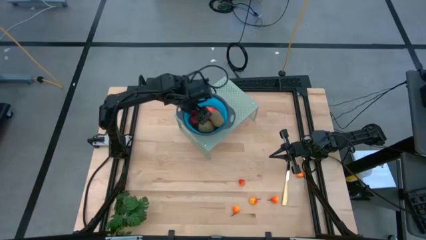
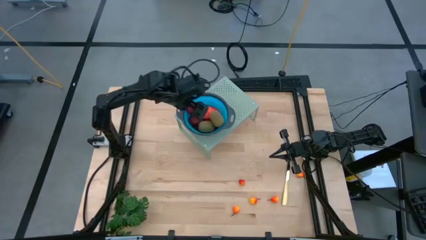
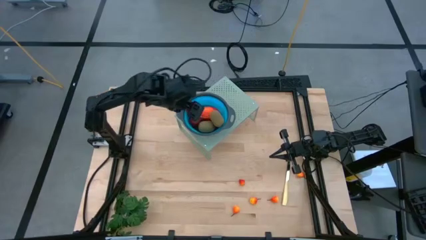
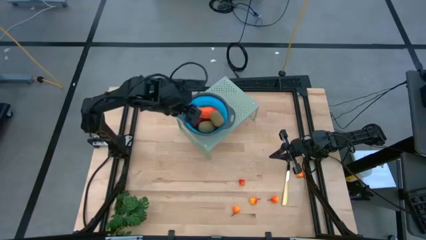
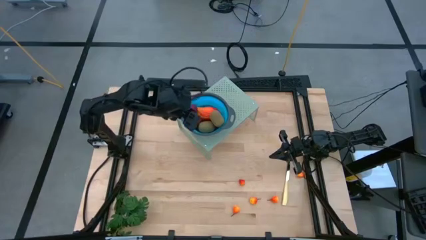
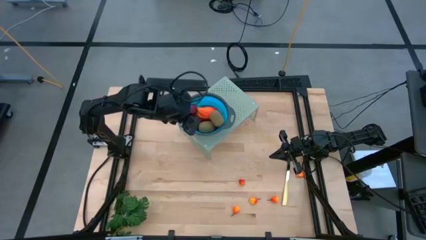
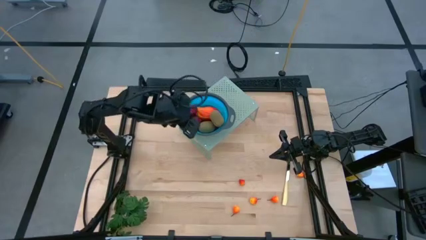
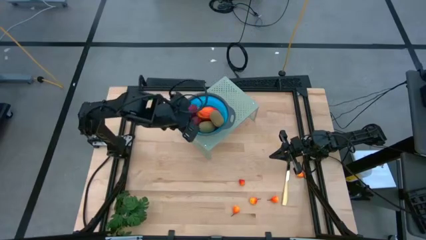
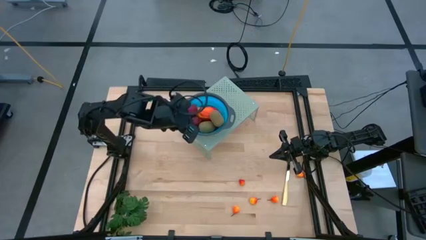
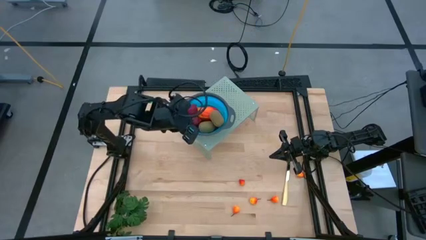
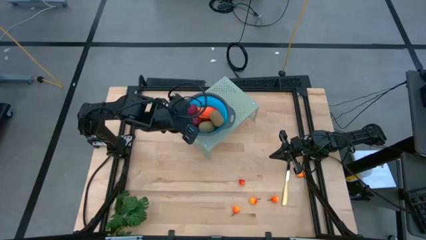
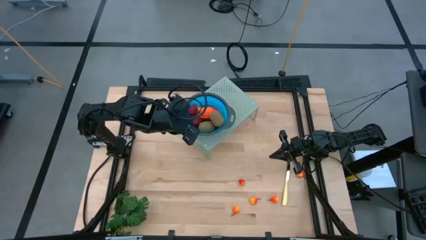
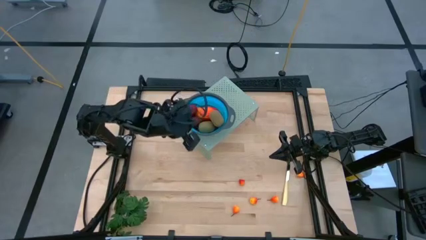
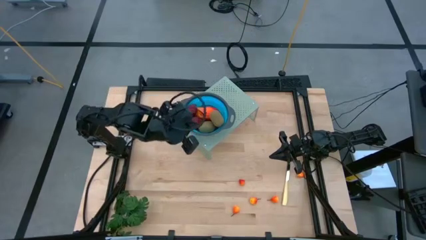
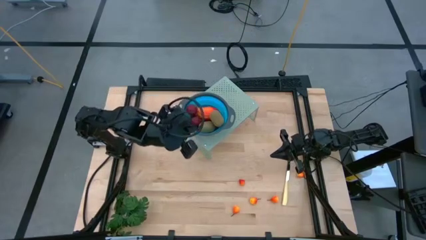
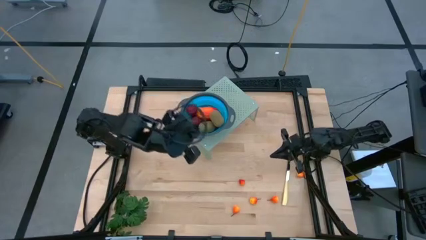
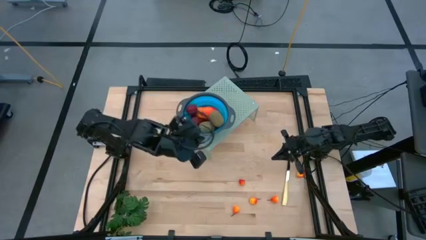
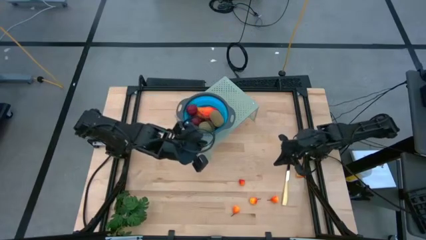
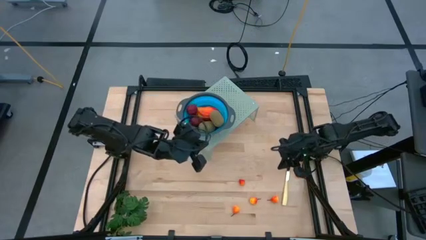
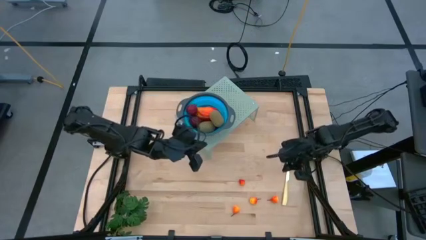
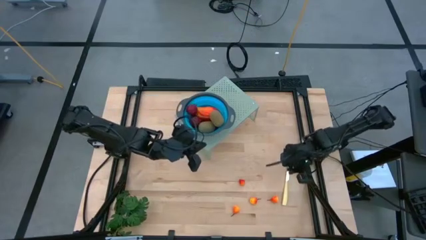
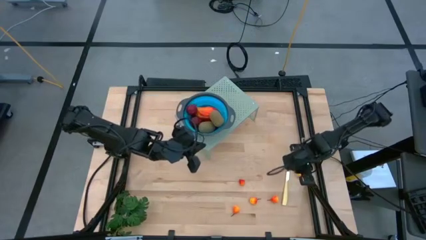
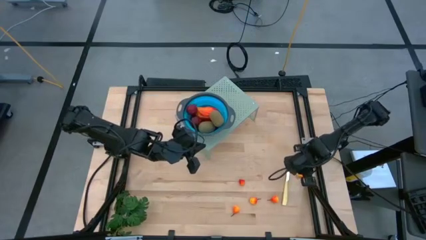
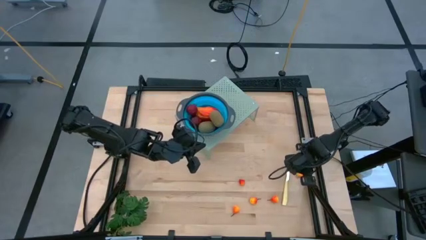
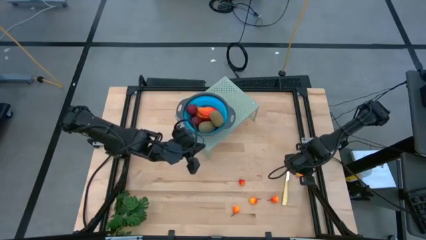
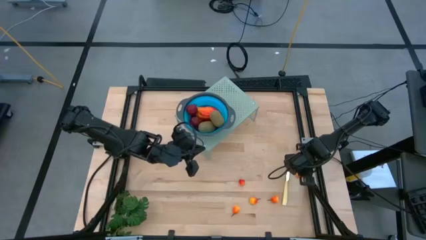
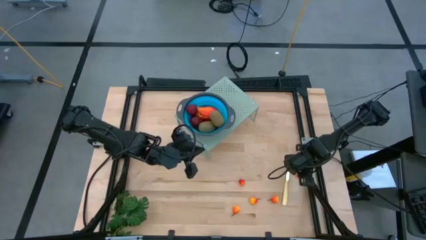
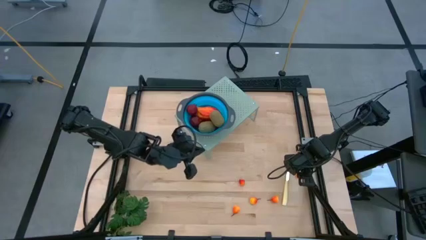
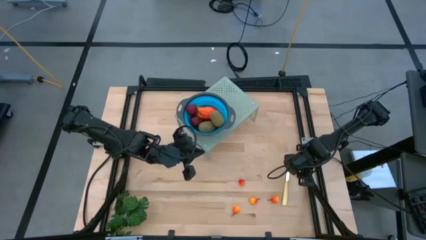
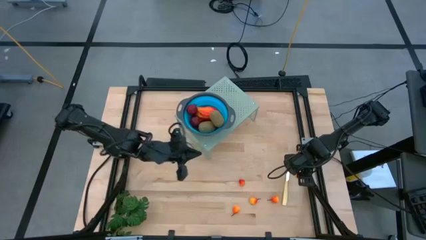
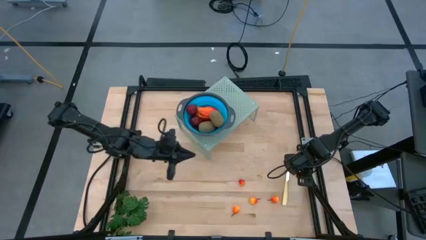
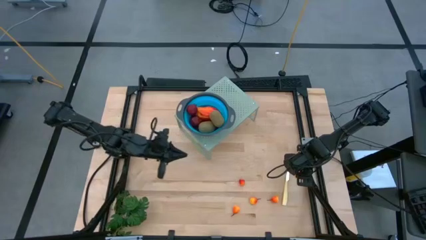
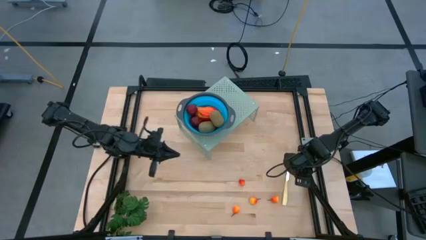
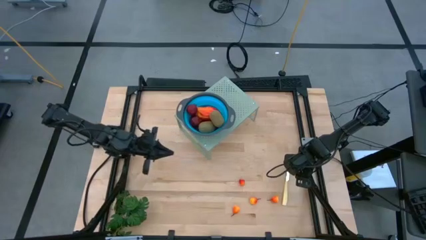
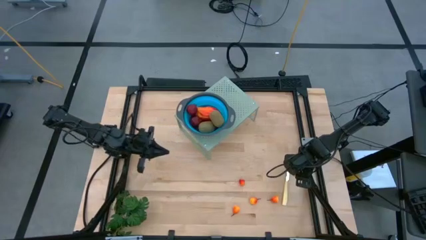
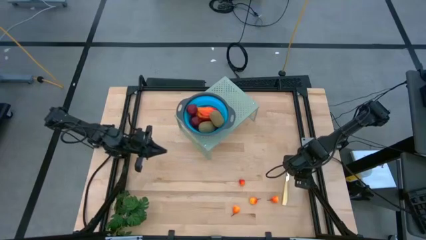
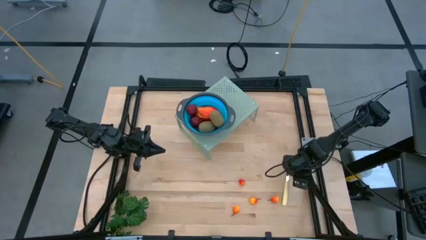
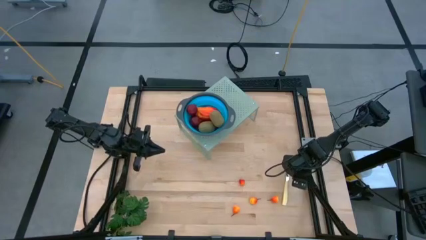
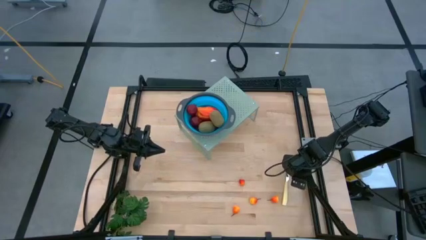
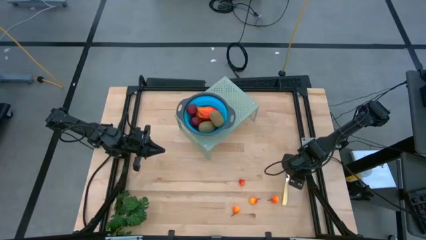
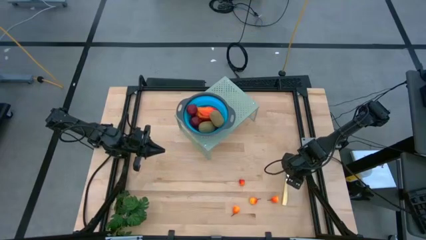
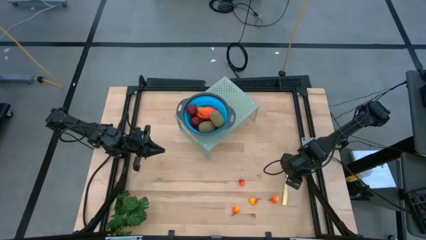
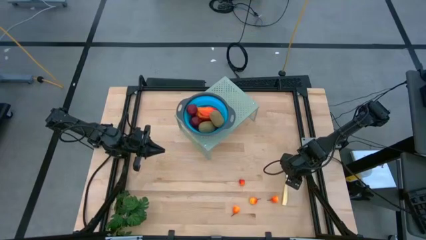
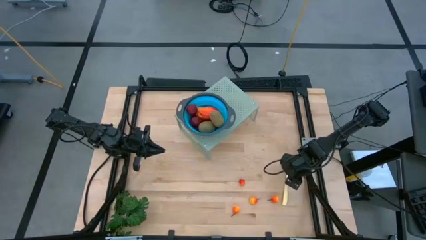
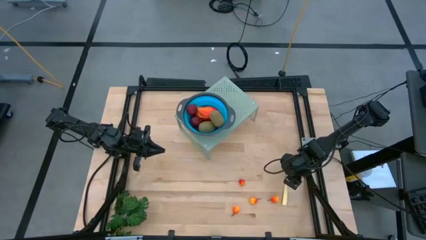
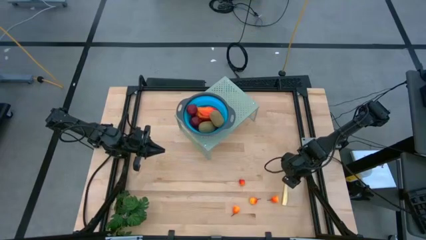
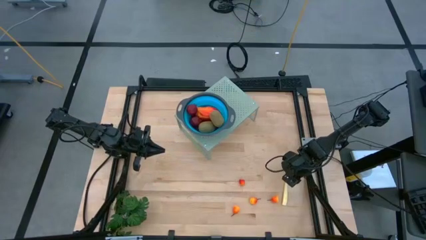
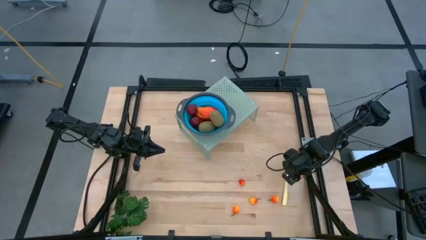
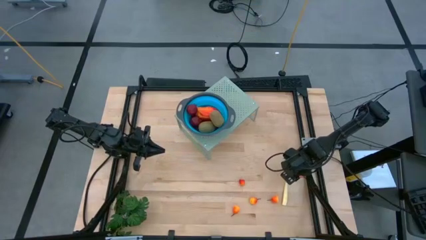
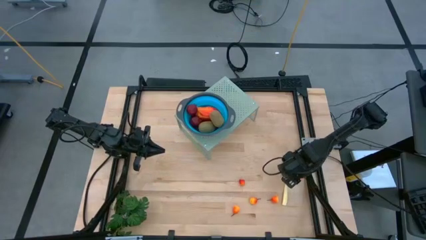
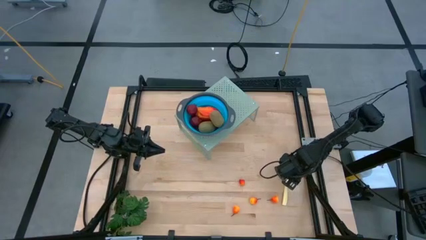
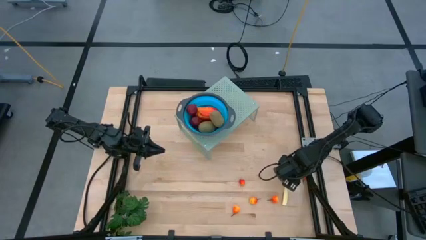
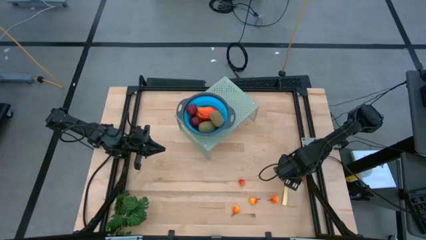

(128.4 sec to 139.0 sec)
Task: Pick & Place Fruit
Put the peach into the collapsible colander on the shelf
